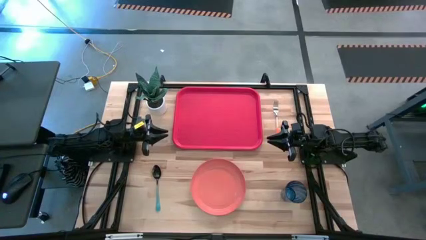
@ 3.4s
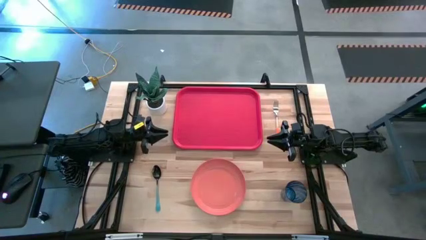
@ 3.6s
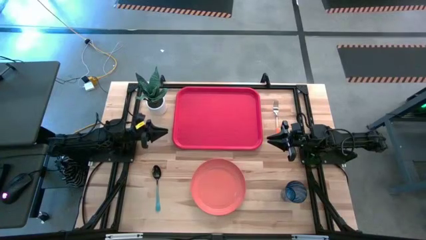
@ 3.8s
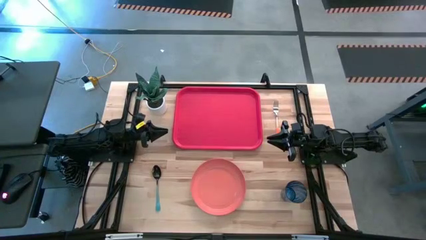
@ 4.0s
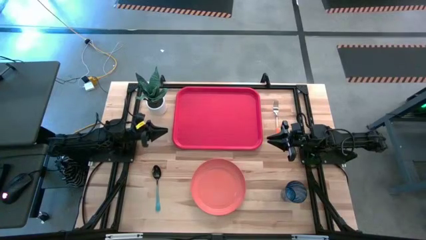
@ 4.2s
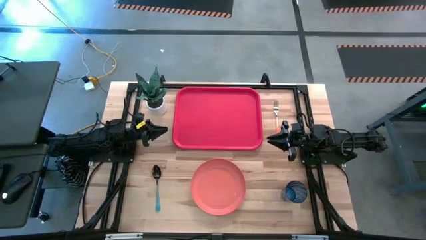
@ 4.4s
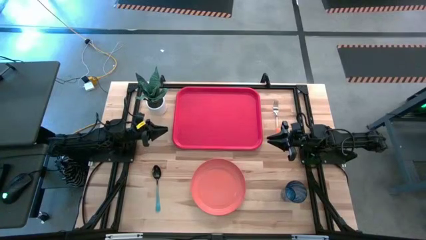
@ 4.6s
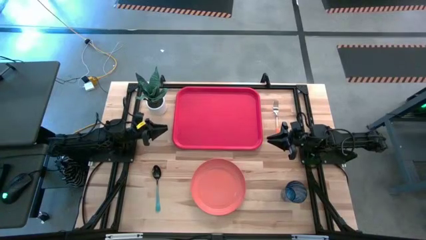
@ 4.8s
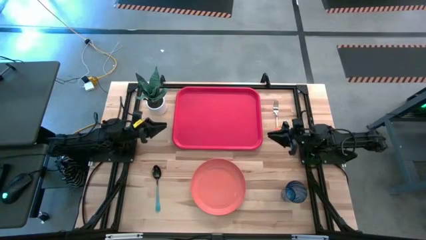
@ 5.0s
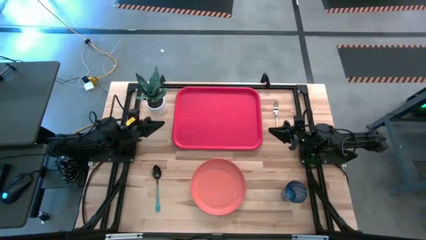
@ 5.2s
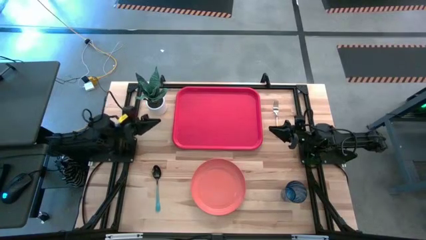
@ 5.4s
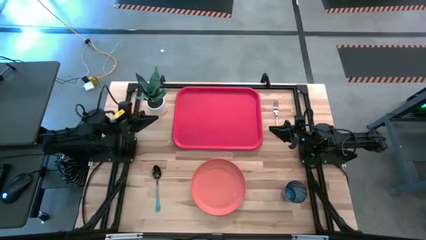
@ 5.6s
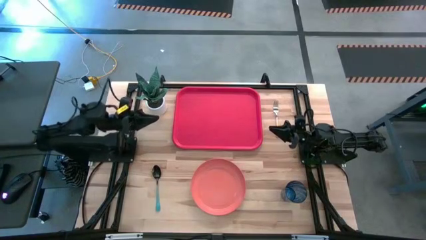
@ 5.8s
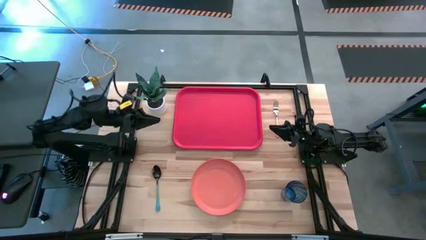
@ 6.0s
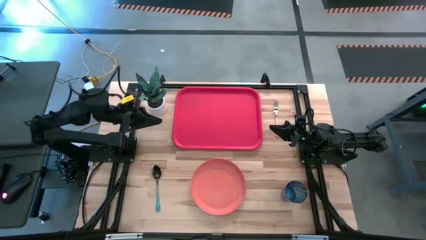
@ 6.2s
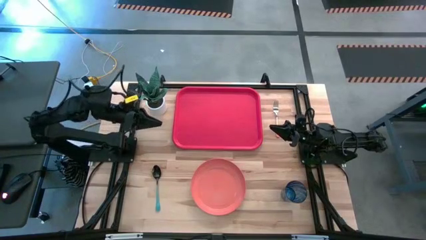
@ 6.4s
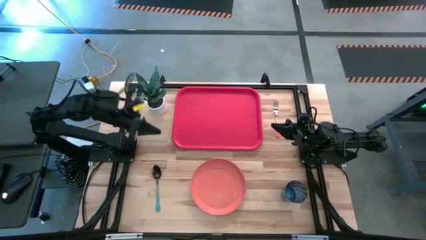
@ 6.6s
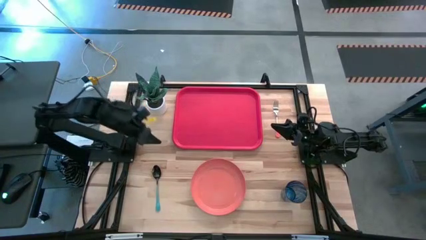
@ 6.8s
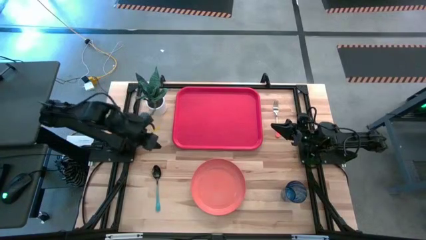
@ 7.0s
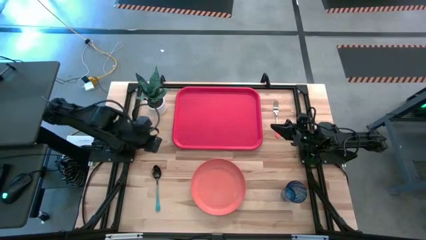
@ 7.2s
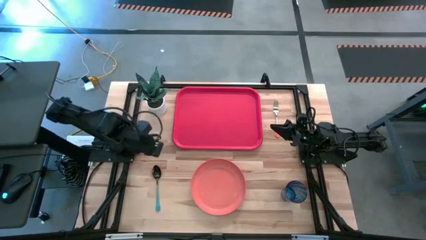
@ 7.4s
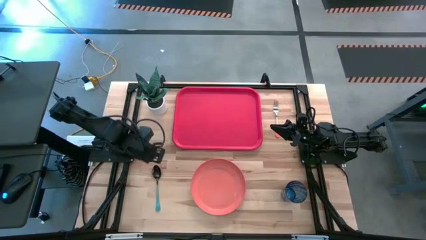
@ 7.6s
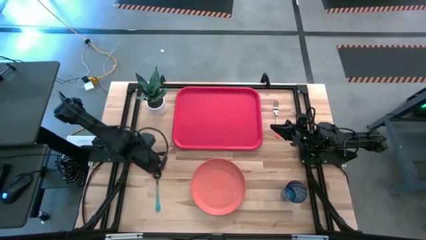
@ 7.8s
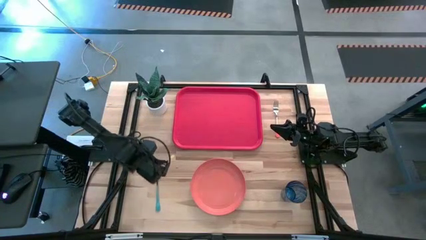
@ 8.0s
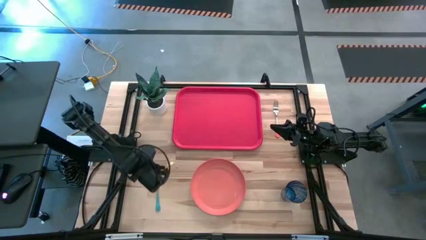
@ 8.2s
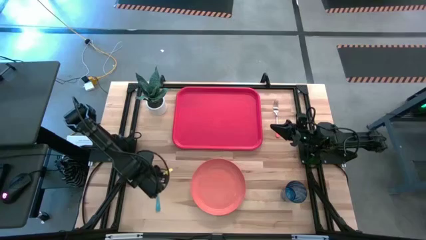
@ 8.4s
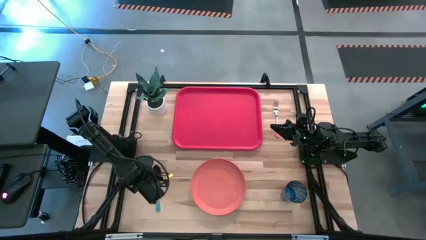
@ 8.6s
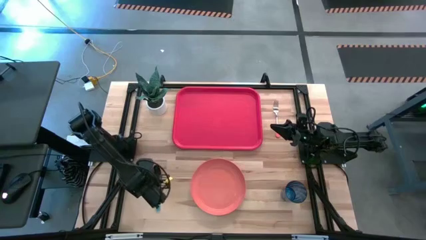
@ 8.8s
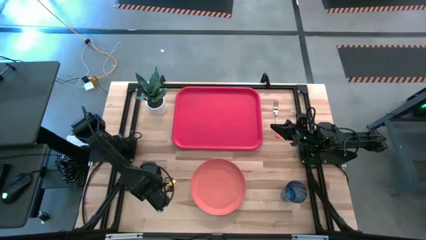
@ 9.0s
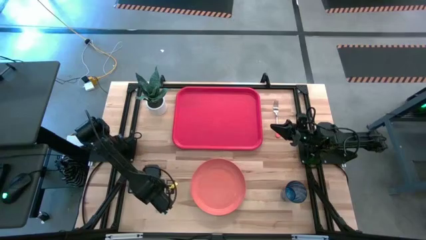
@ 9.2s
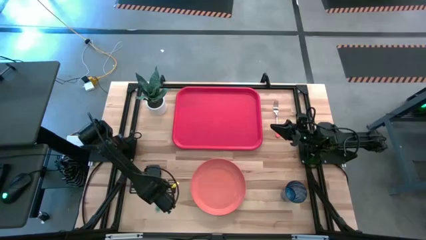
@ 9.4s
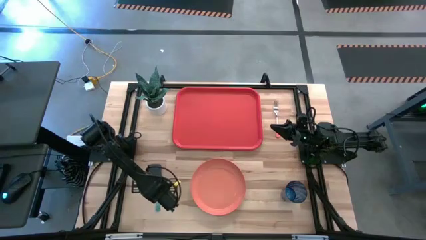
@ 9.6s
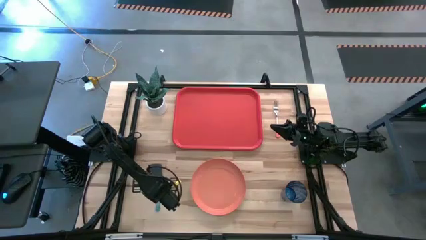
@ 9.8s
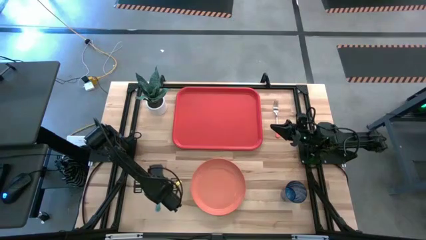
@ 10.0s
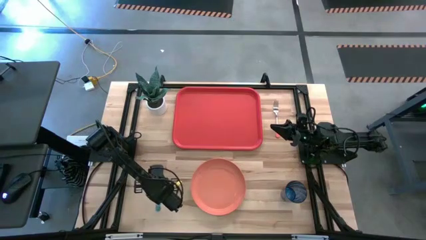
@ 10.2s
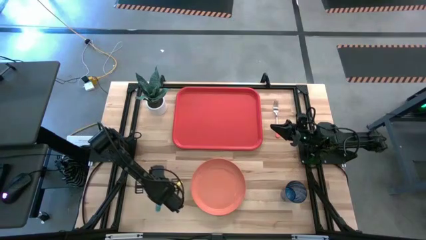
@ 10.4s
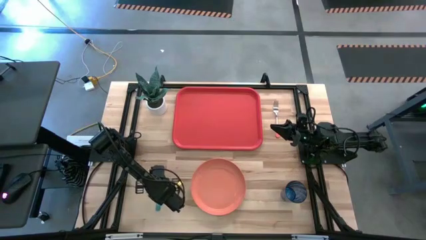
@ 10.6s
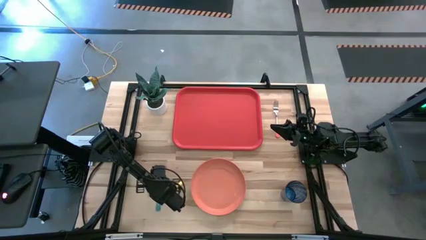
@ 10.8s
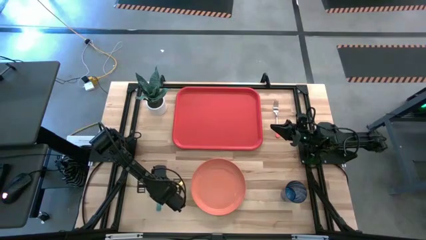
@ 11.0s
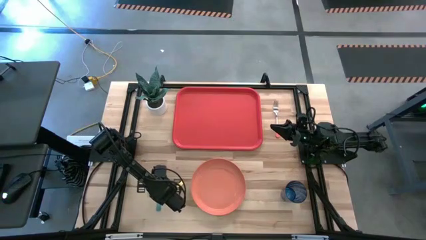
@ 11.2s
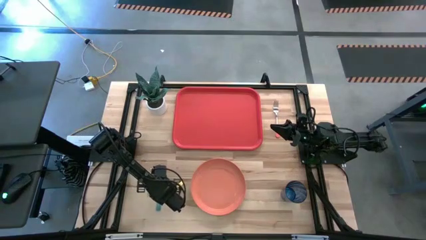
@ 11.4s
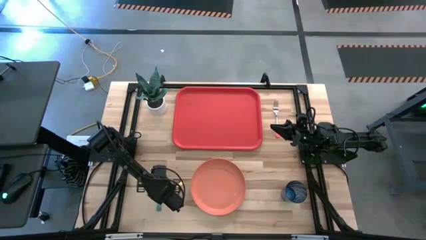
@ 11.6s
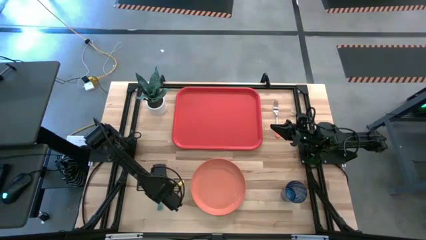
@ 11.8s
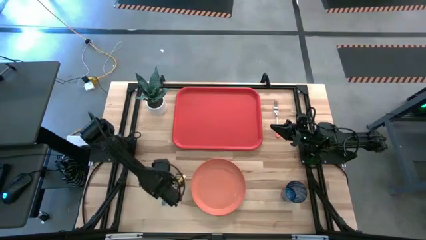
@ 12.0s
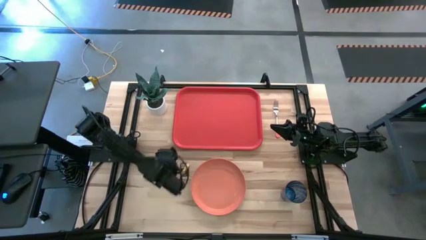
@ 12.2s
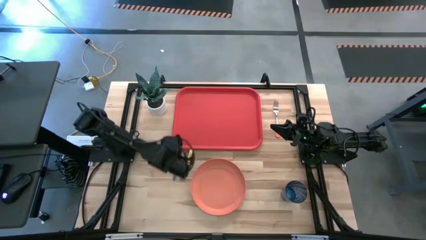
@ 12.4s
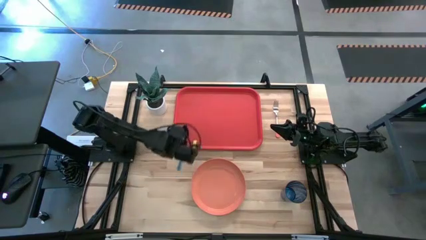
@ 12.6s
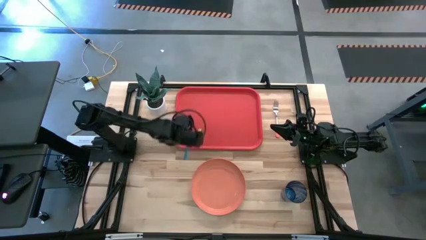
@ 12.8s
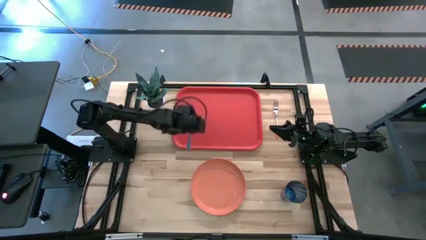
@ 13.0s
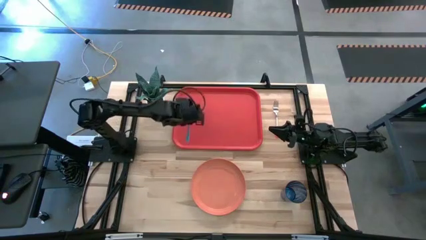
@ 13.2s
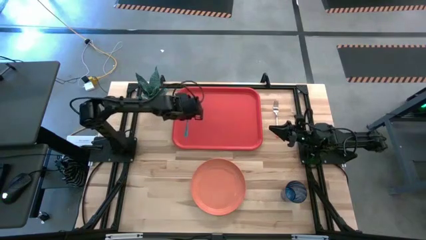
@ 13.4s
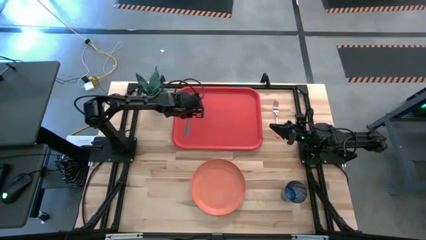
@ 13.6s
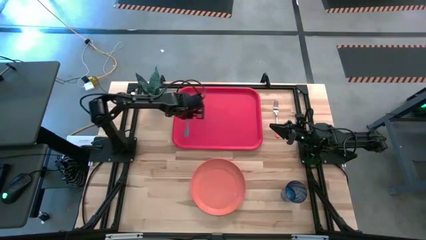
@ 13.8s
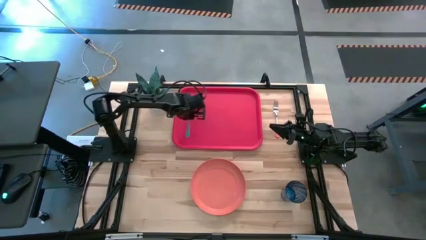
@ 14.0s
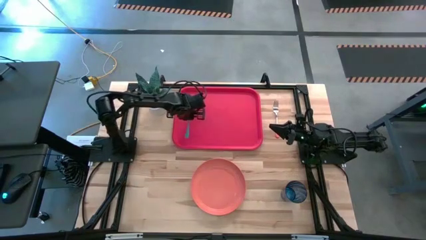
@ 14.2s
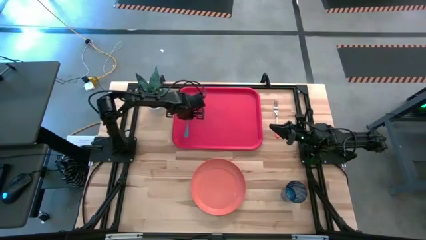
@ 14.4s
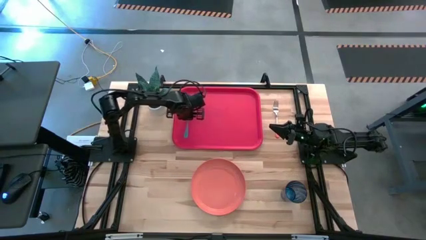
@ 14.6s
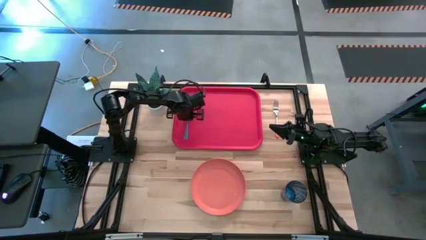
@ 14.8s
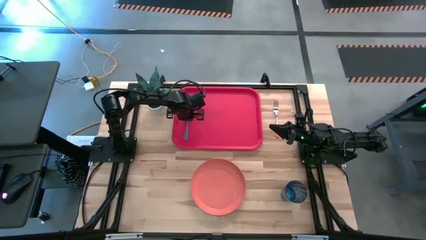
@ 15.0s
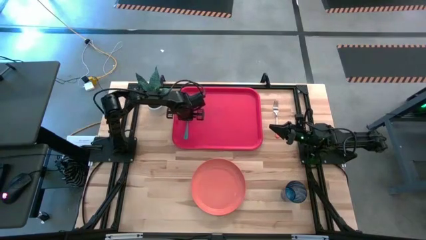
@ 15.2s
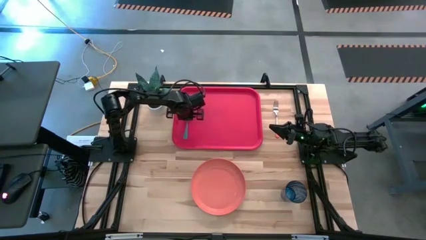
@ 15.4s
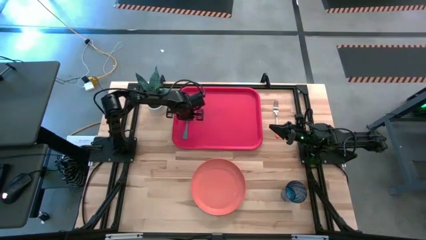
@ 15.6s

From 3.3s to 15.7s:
Task: Pick and place plate/cup/fork/spoon on tray
Put the blue spoon on the left side of the pink tray

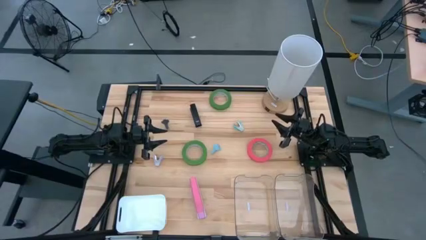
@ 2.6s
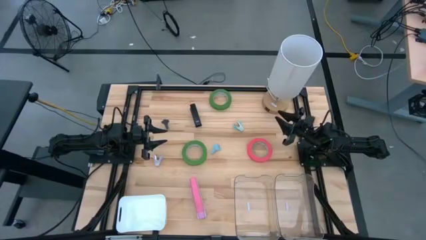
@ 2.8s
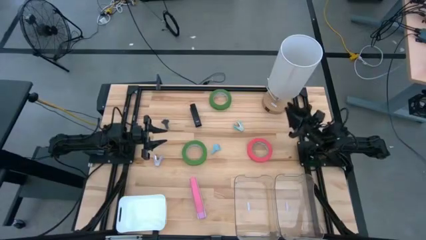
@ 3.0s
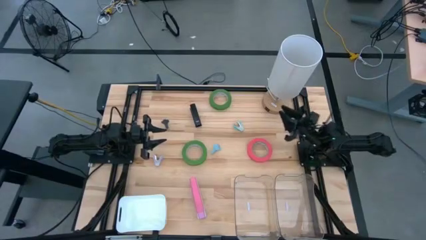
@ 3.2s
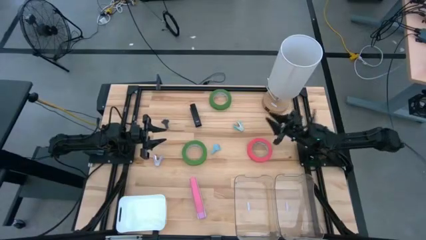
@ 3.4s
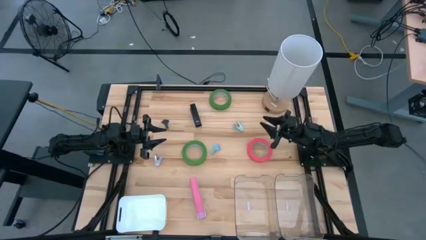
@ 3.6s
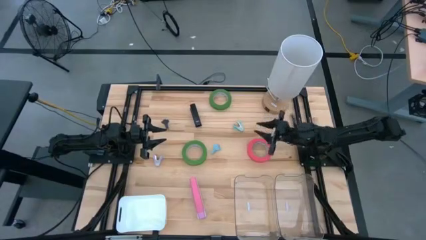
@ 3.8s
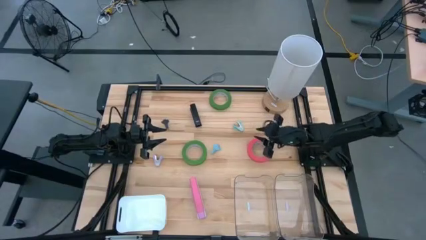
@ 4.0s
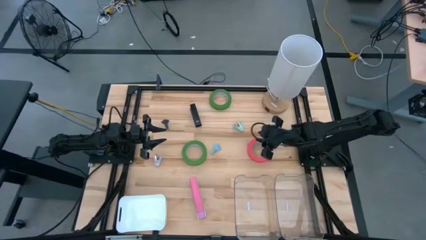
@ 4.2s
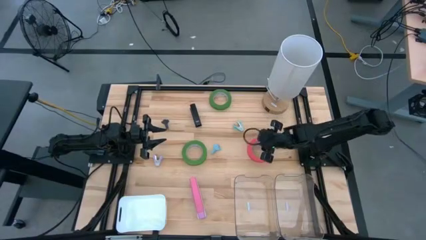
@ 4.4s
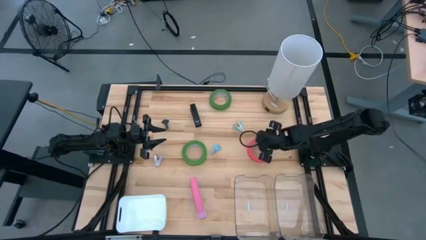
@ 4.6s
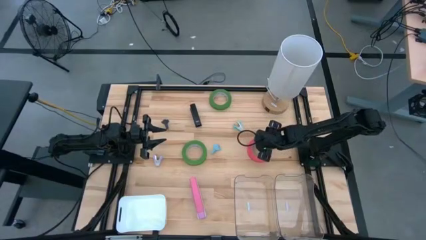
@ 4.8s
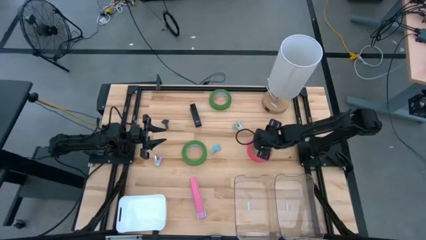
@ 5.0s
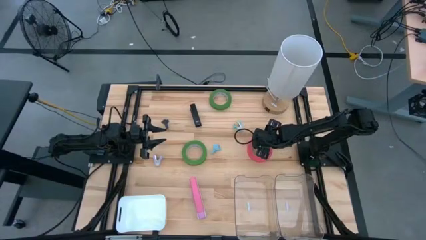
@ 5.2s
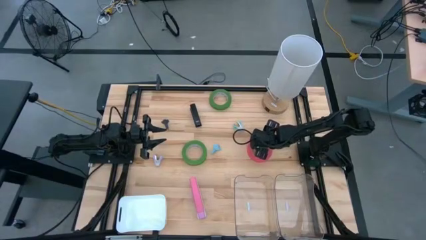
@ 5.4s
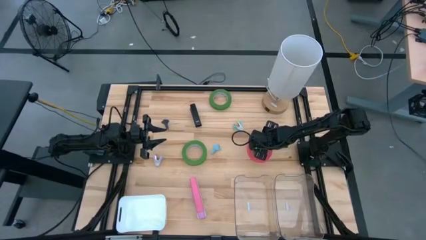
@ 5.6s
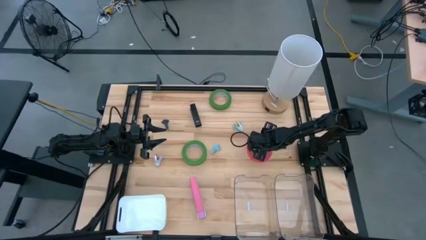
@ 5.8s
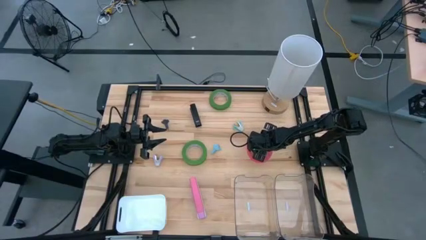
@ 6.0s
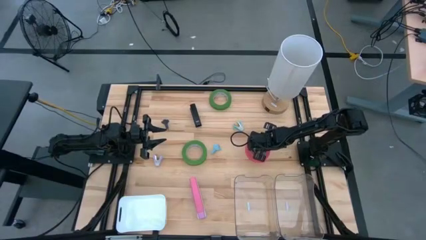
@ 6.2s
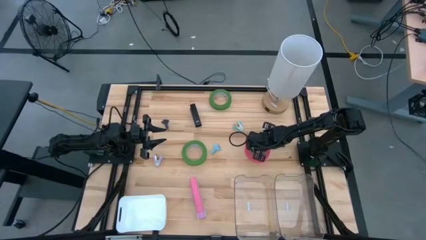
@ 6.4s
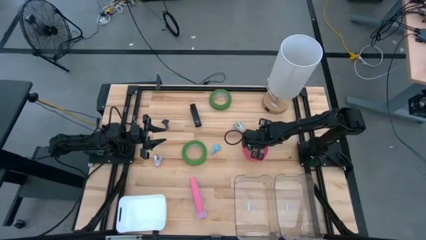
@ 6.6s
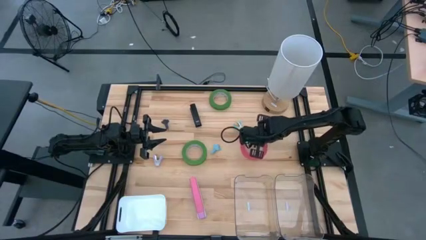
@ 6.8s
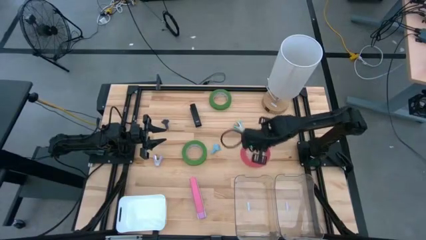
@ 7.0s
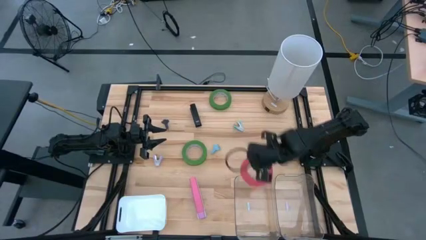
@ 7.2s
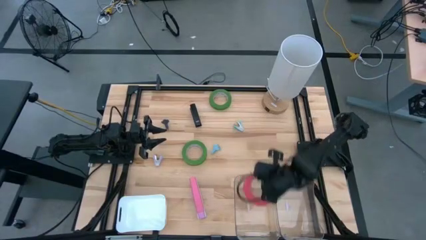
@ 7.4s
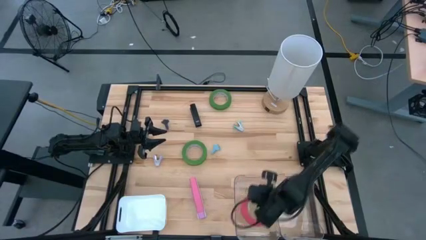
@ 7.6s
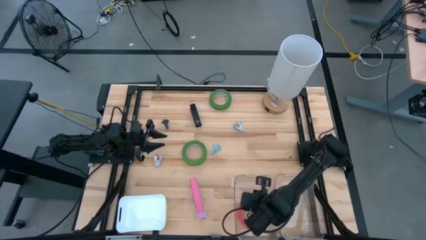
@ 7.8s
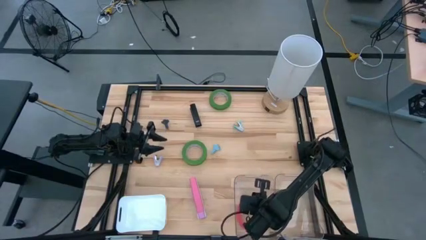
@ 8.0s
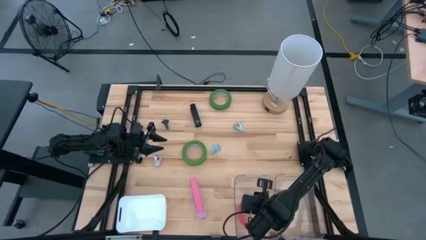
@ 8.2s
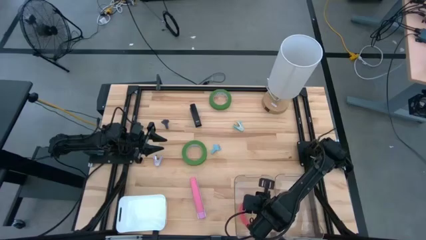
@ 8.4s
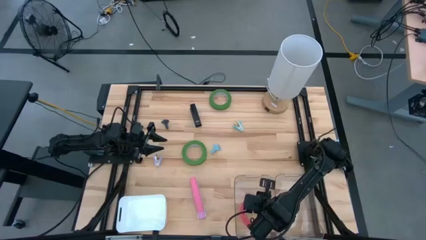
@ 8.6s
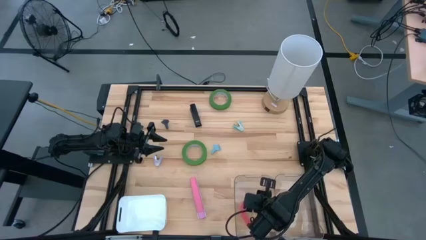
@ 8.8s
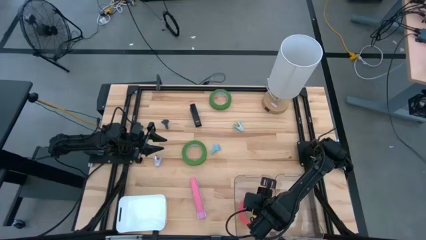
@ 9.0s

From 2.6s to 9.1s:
Task: Pick and place Stapler, Stapler remover, tape
Put the pink tape into the left transparent bin
